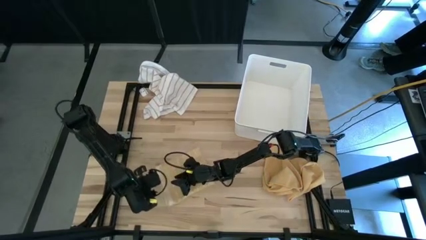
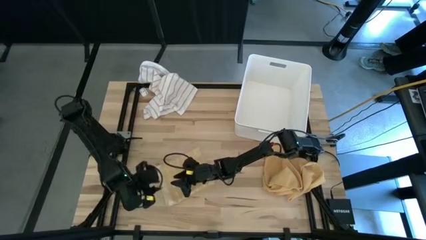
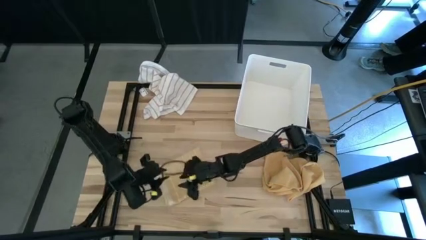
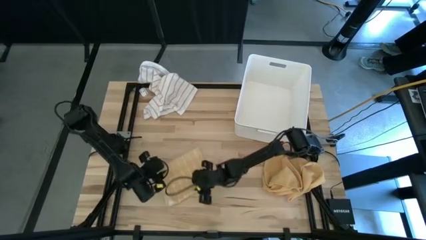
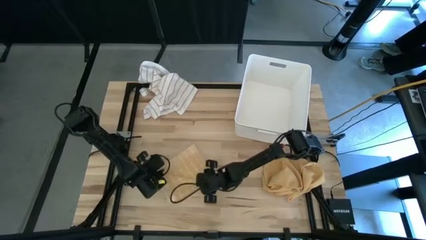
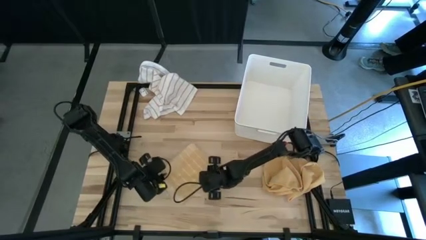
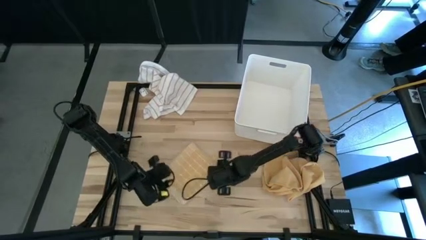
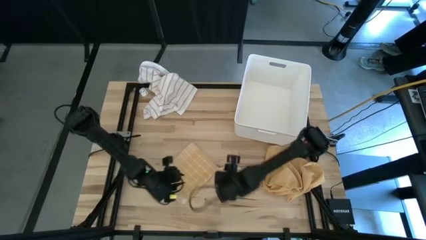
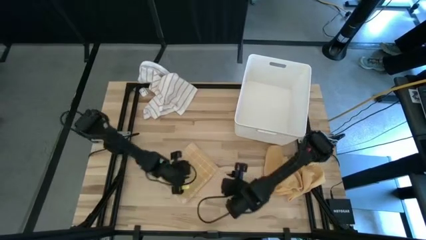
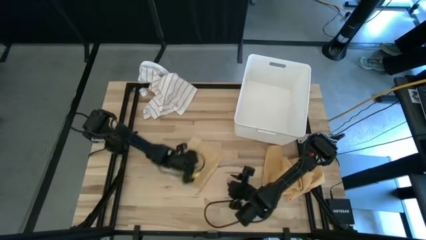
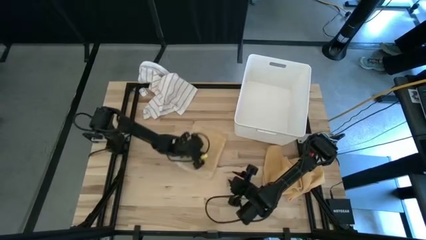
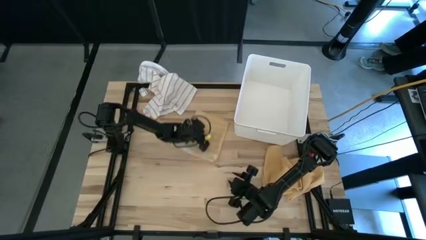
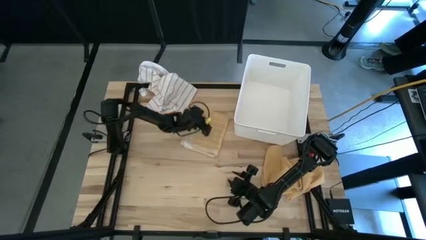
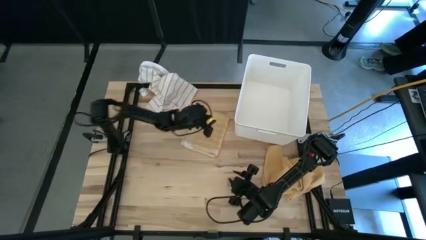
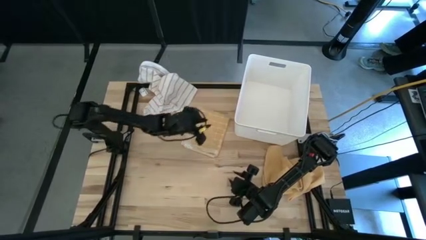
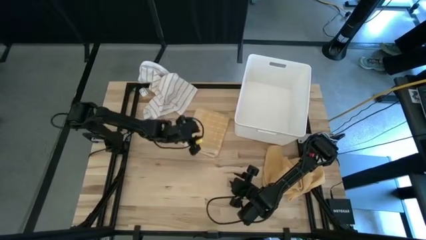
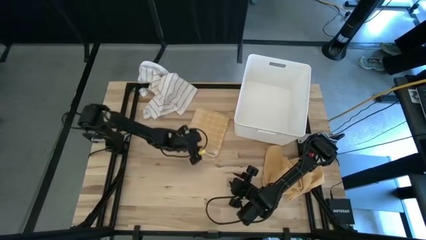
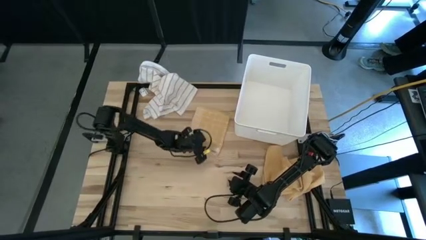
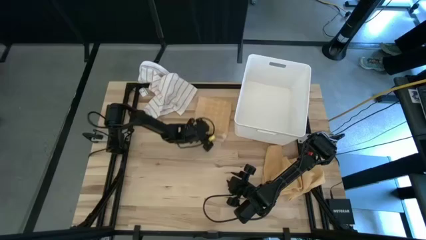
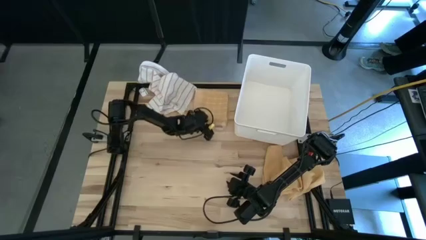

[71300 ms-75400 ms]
Task: Fold towel
Move the yellow patterned towel to the top of the table

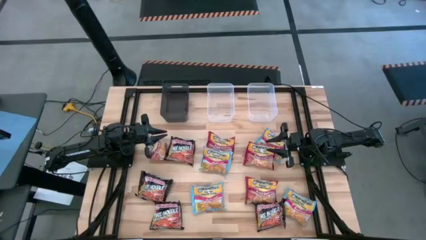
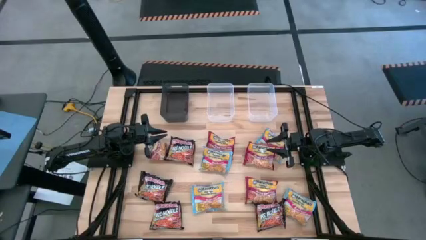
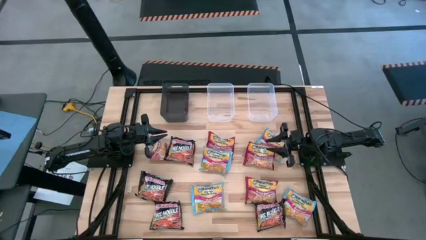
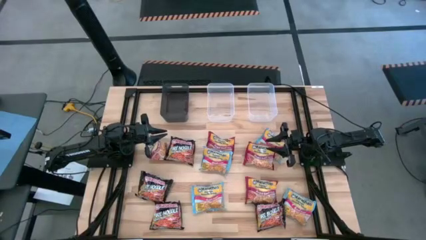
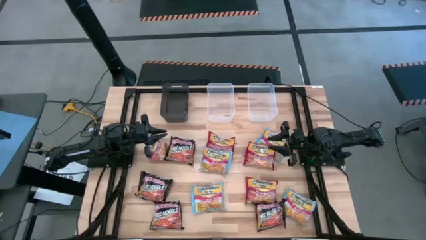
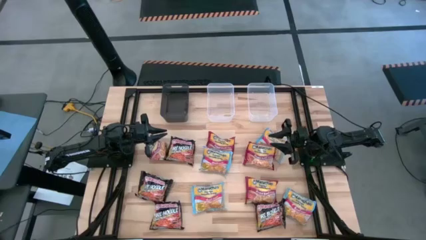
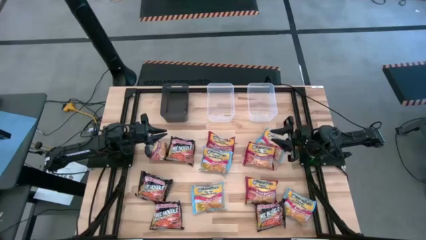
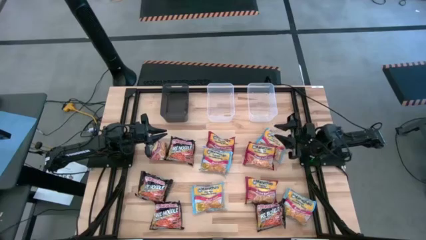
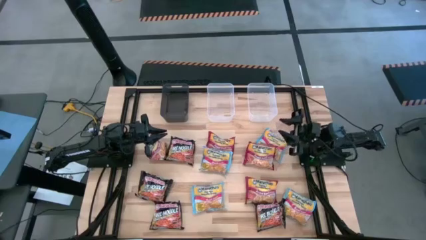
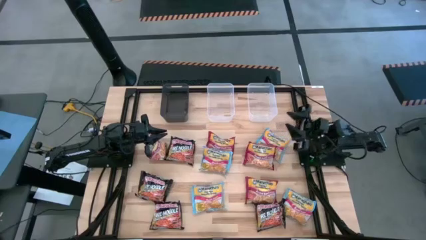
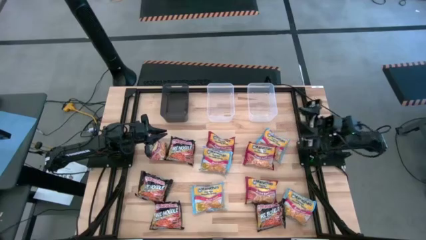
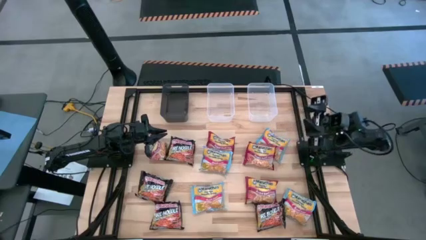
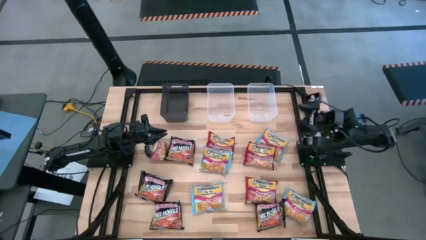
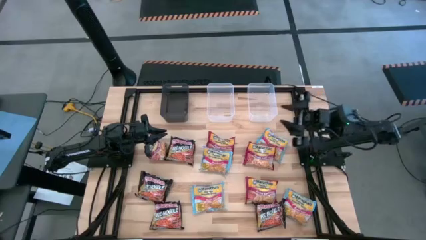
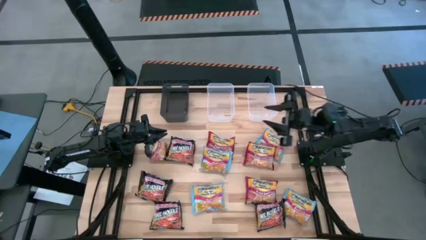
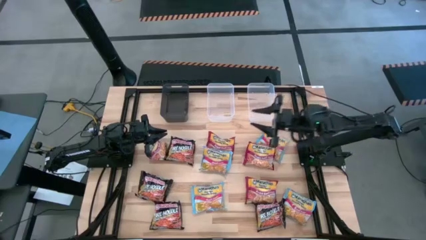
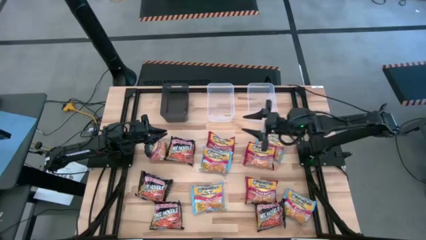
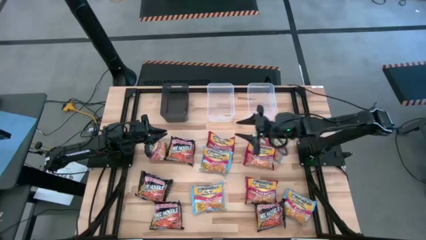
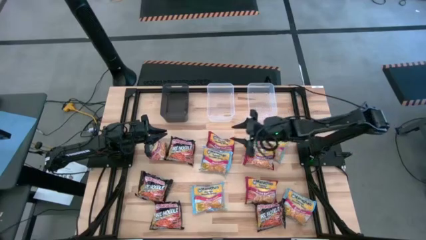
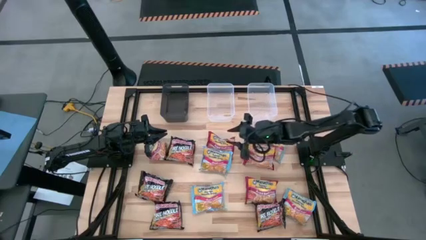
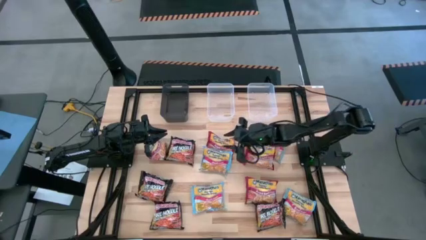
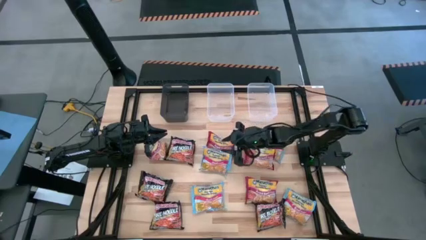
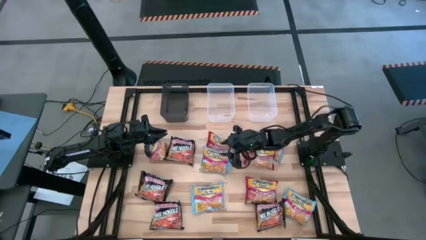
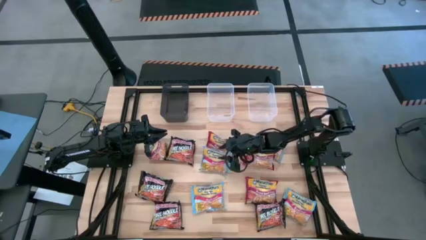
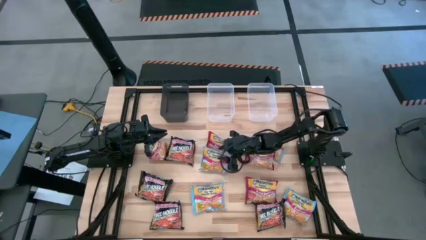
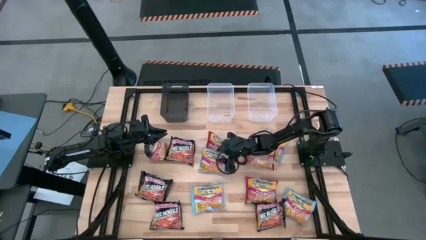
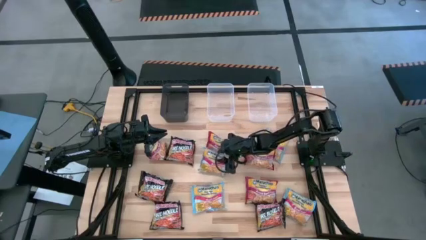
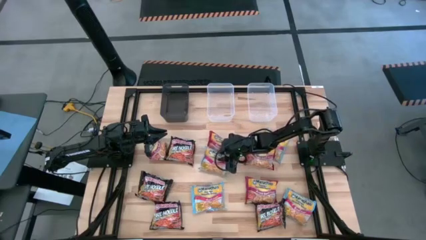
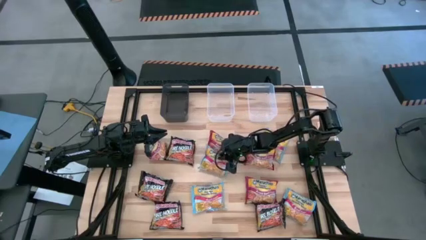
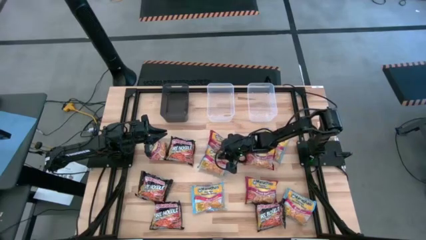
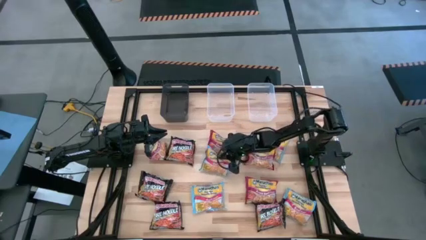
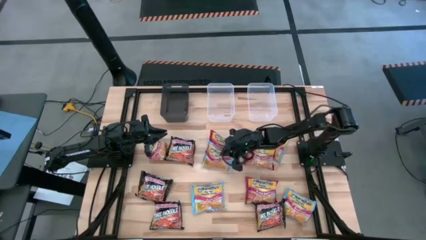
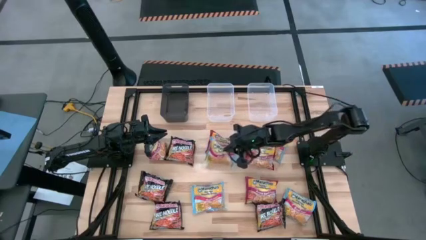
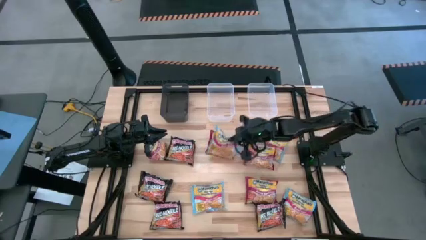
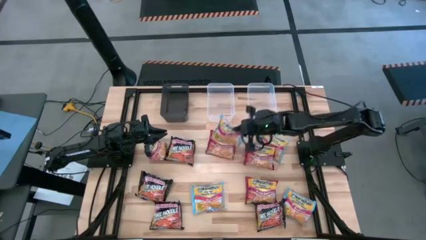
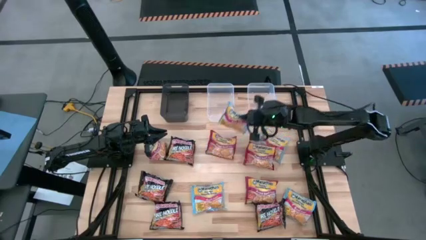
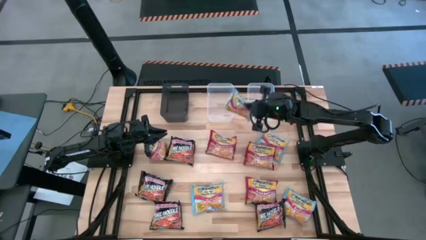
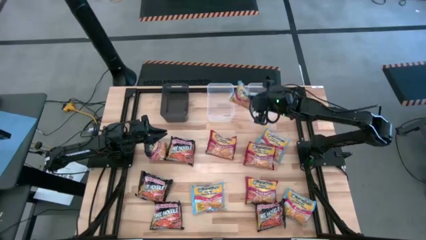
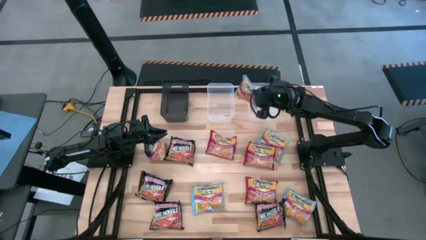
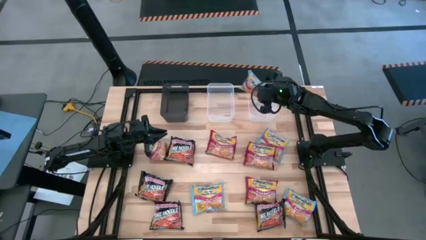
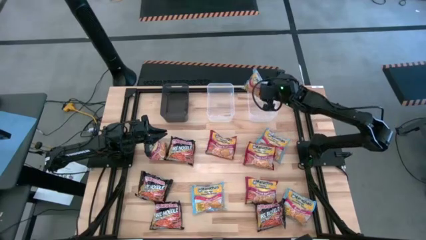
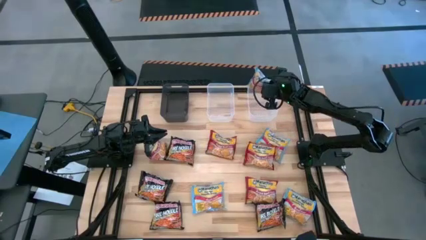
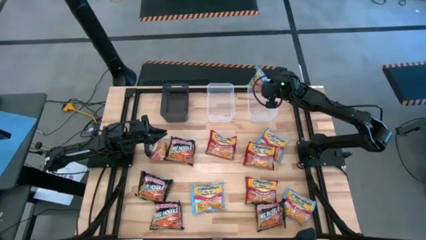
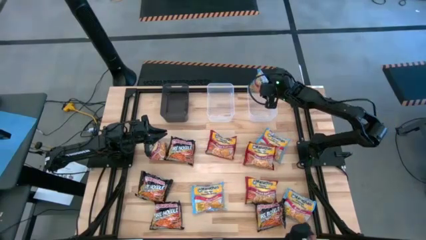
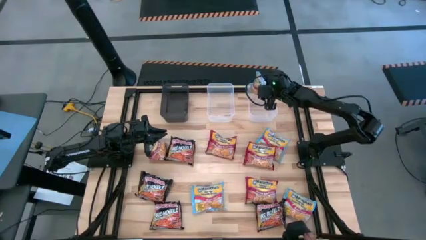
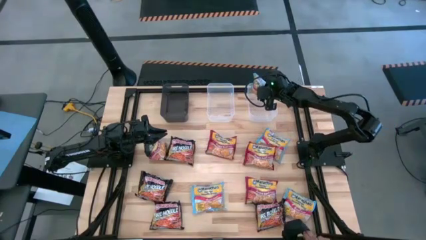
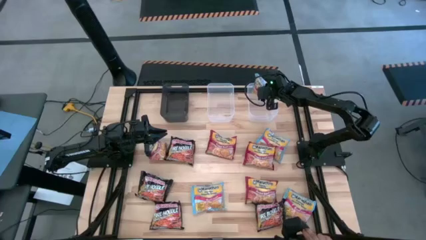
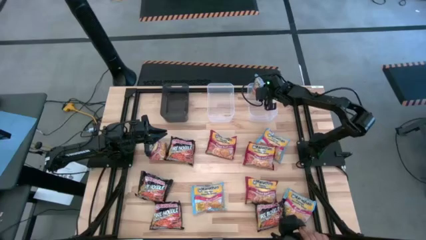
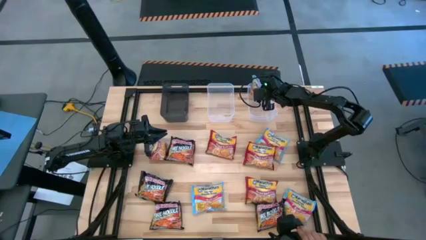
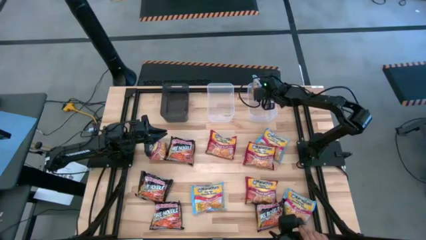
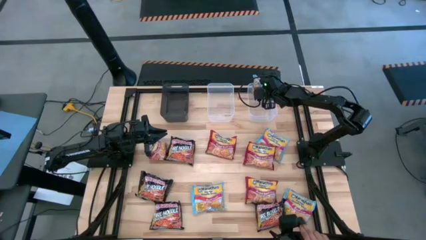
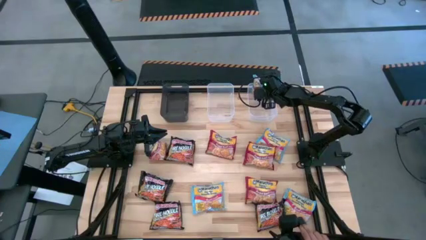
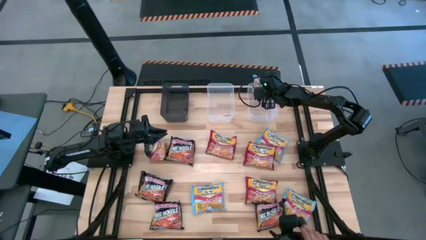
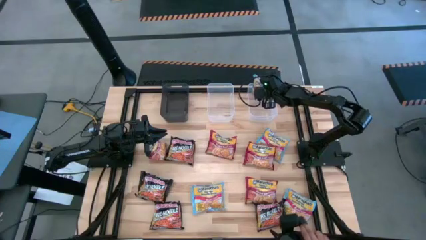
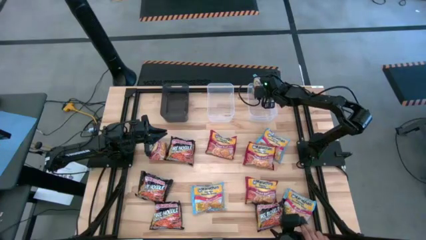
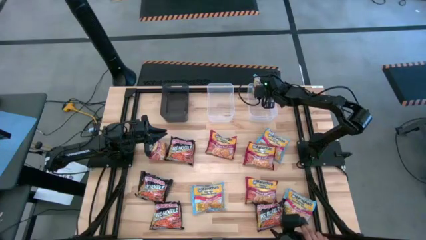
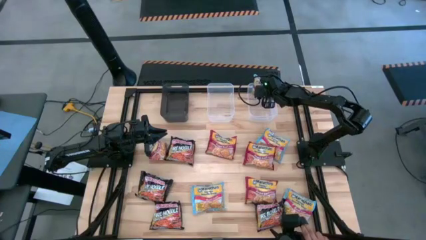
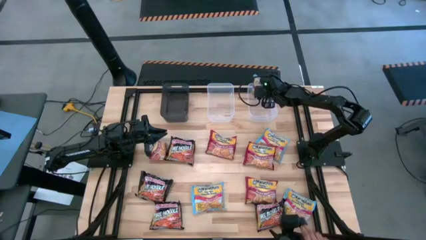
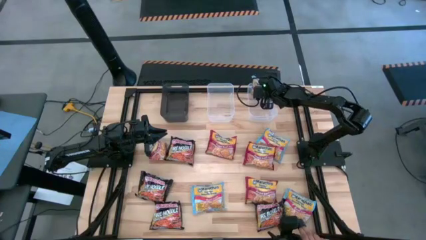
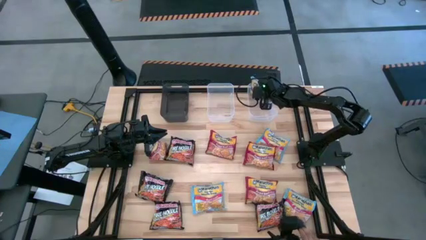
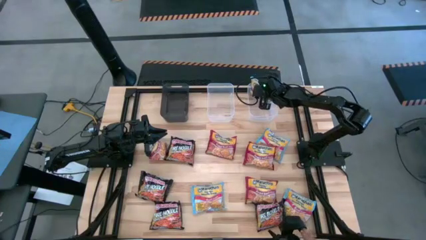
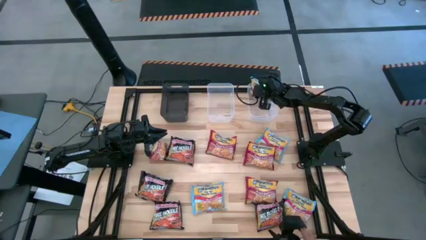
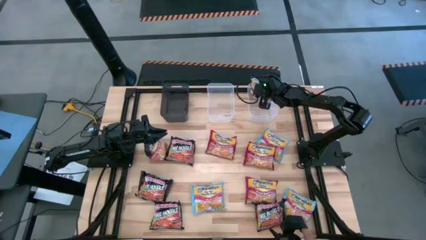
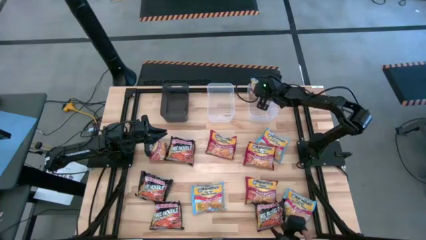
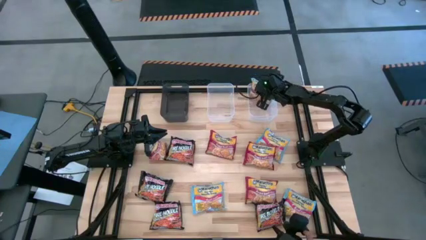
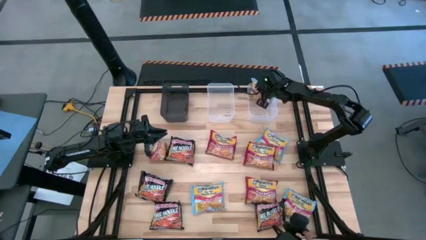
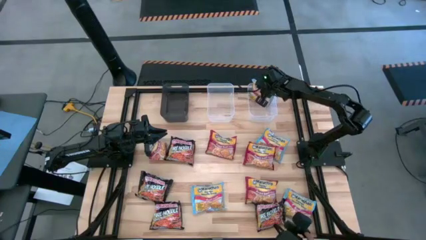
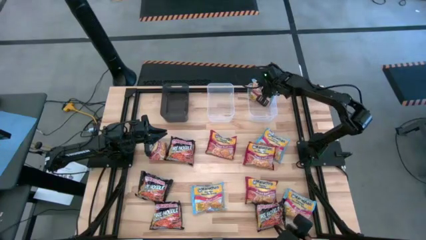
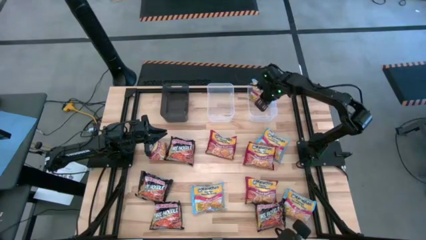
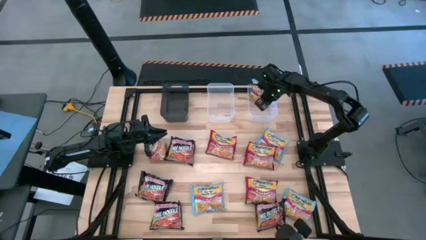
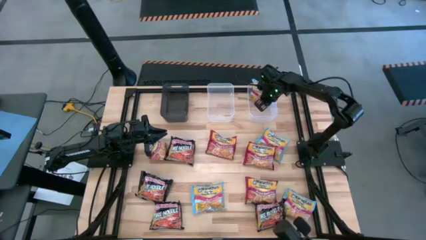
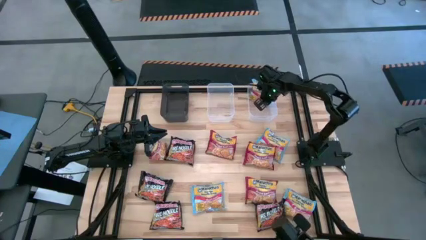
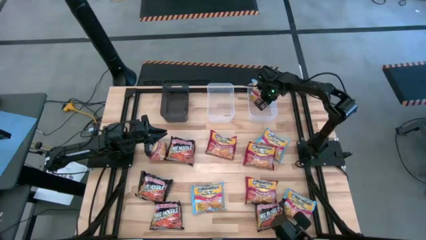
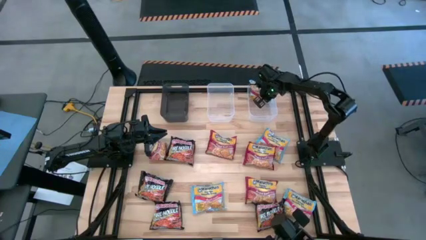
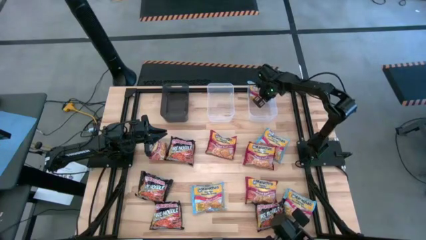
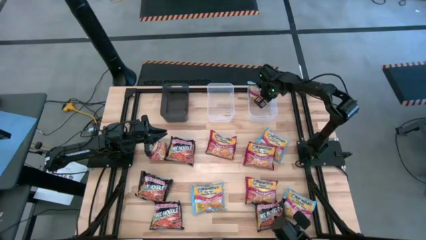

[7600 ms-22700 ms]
Task: Sort Maruchan noodles
Put the light blue noodle pack into the right transparent bin
